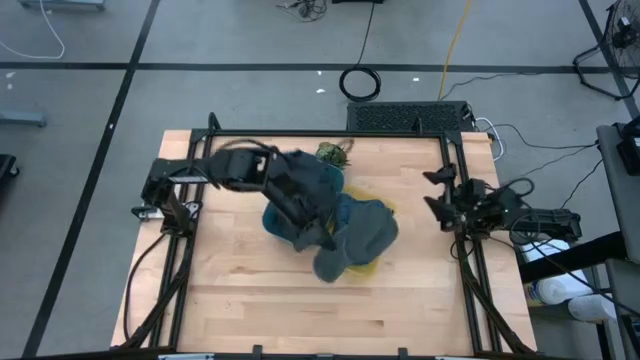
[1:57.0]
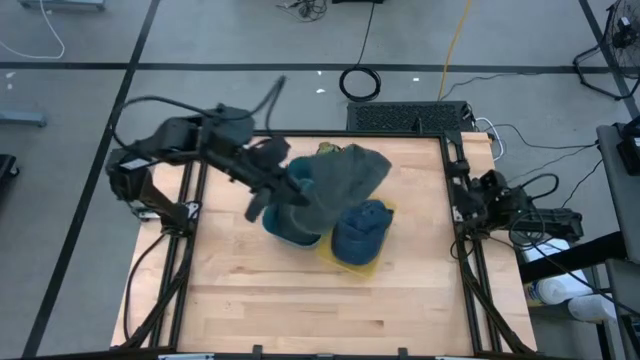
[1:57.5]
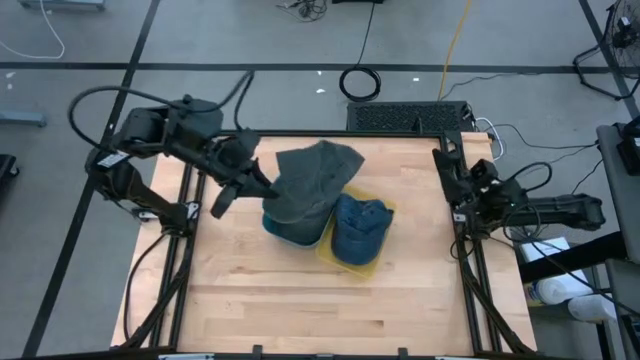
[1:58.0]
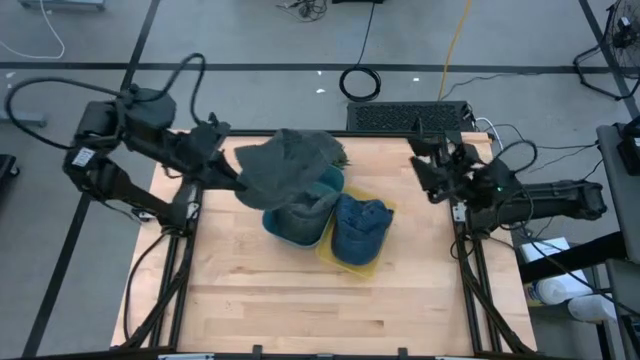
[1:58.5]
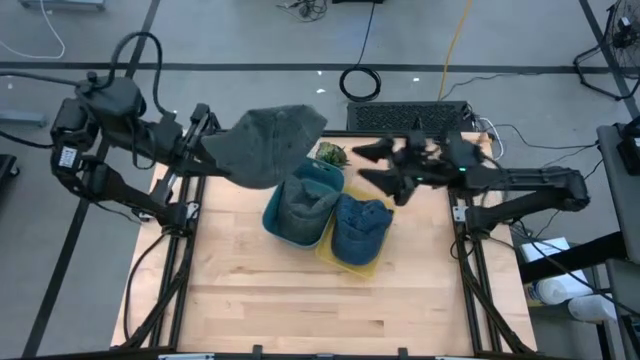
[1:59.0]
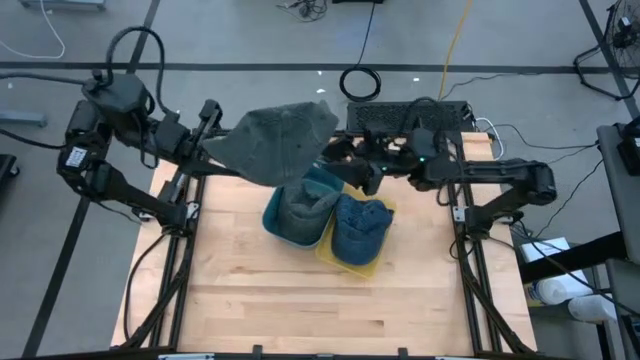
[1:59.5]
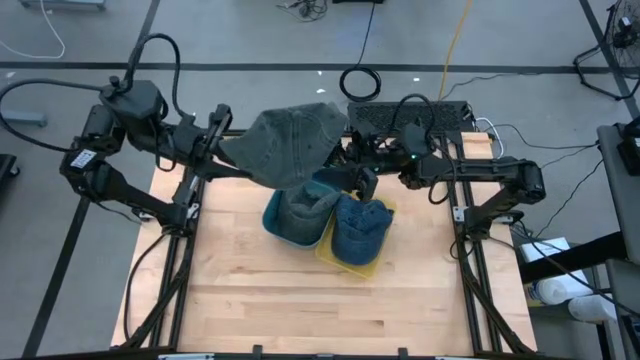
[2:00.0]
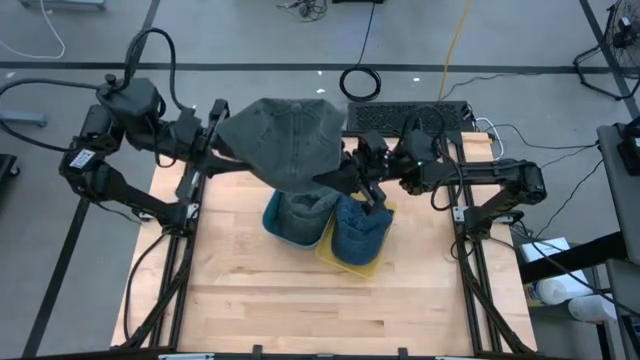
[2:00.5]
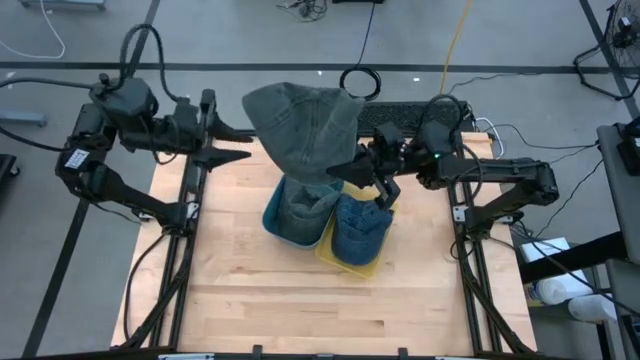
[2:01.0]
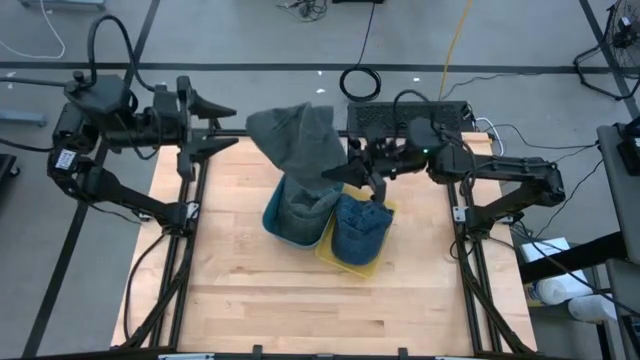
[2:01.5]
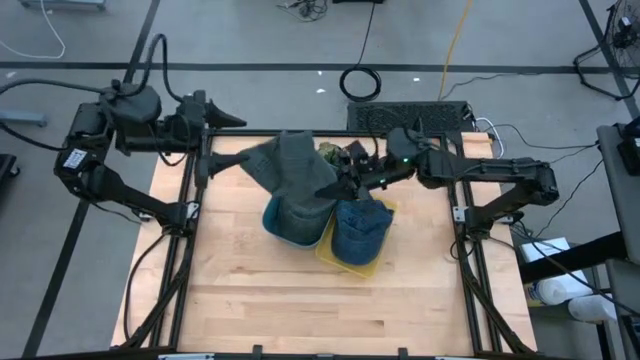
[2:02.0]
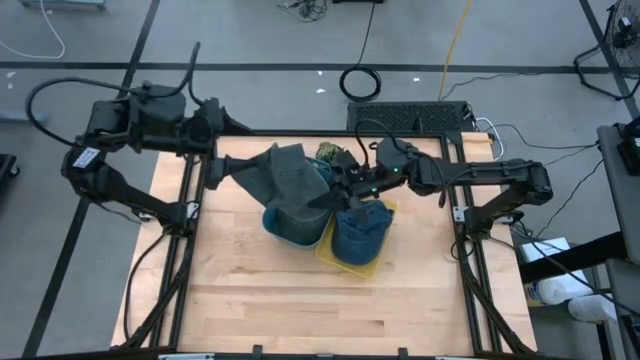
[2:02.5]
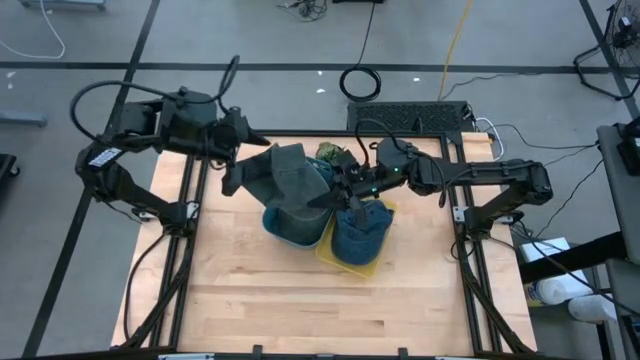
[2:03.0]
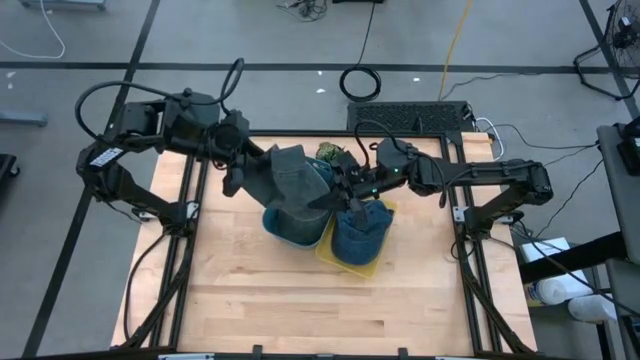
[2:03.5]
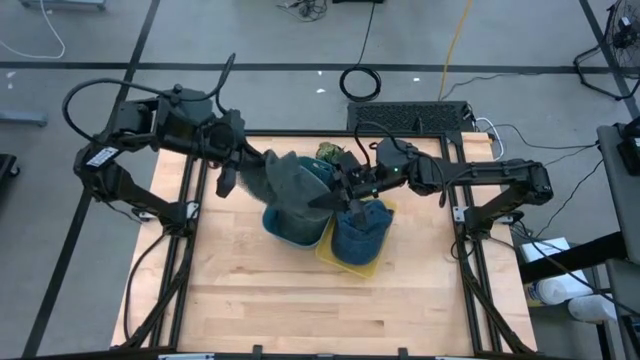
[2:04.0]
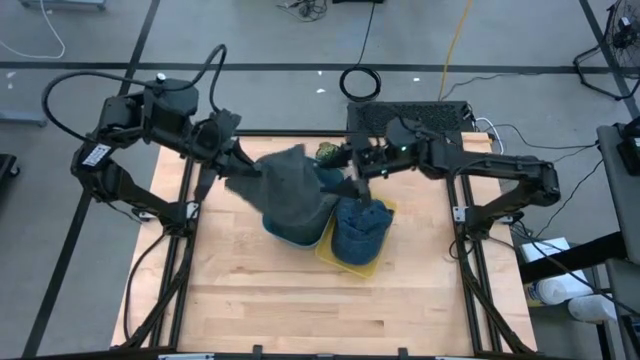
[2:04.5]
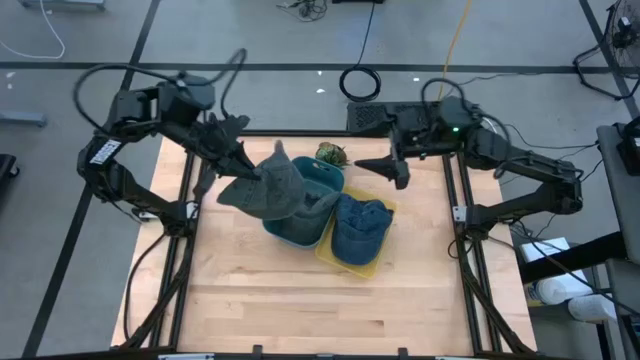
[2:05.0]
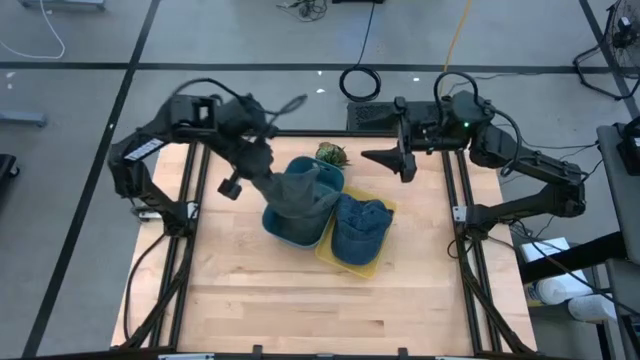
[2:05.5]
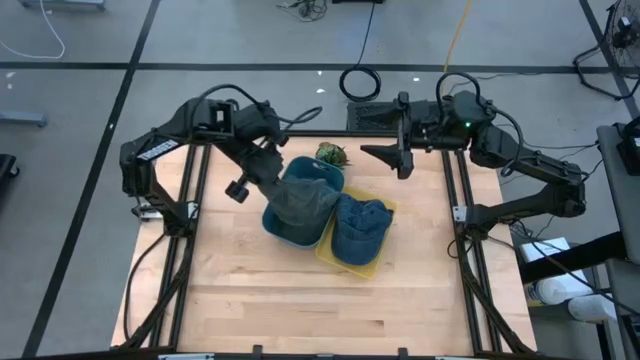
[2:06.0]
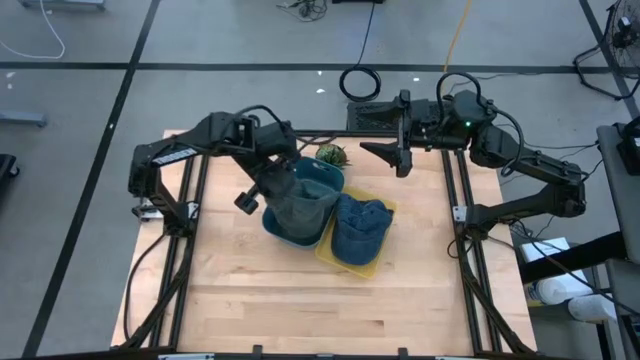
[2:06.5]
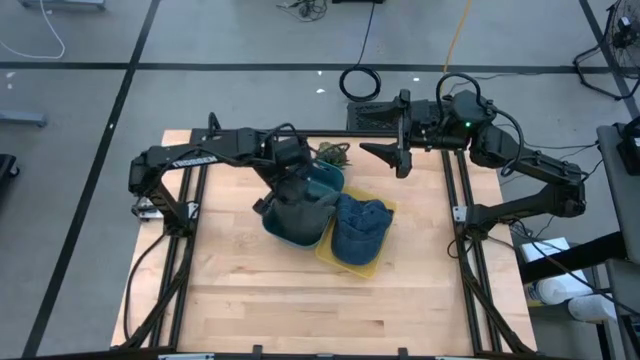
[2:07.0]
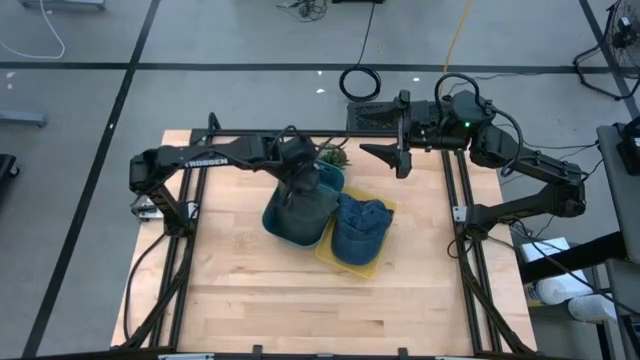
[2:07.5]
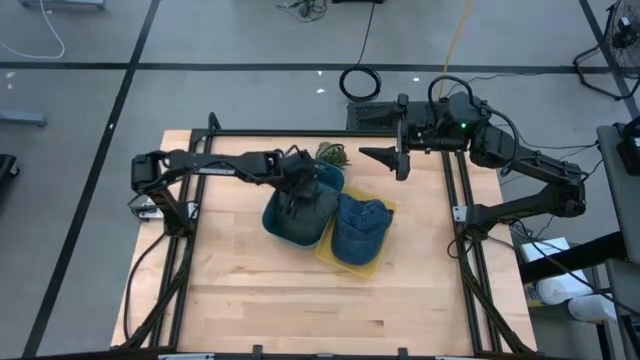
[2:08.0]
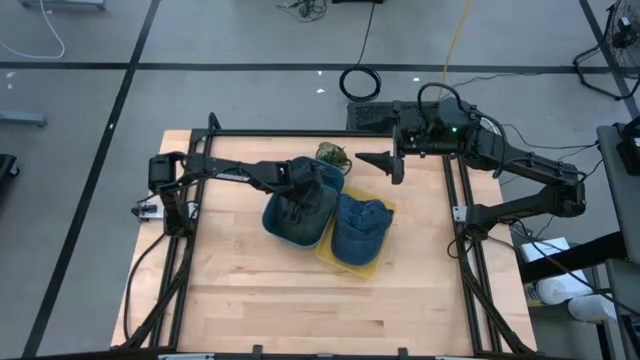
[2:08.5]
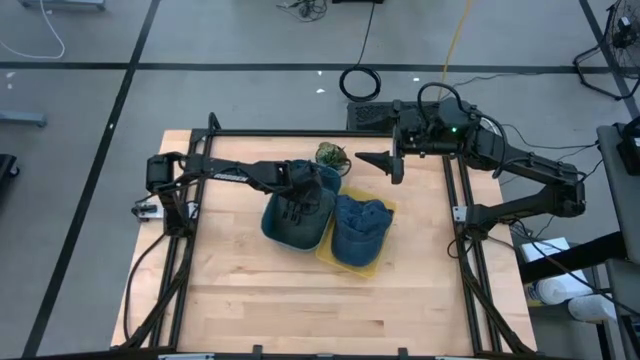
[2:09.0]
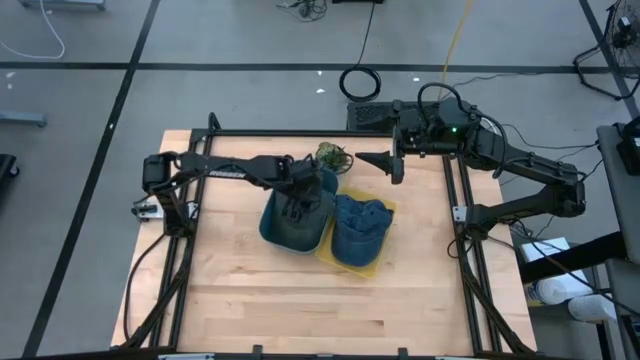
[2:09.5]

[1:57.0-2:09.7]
Task: Pick & Place hat
Put the black cap into the blue bin

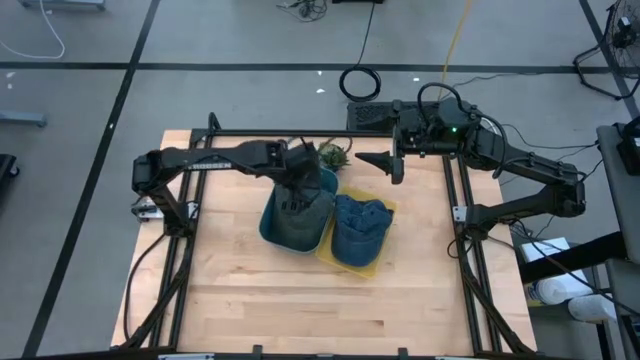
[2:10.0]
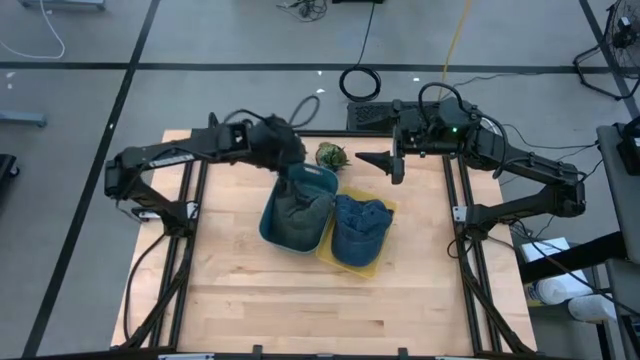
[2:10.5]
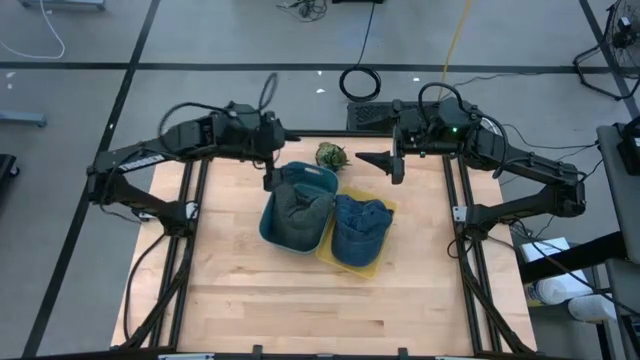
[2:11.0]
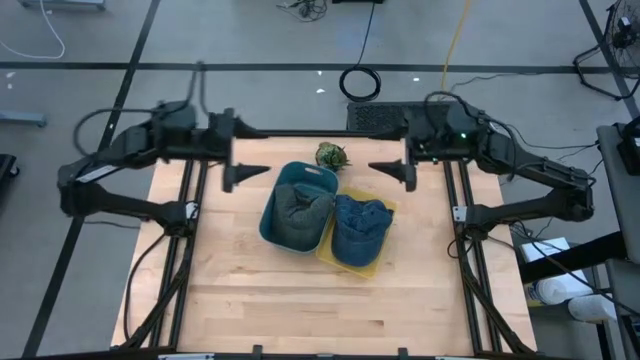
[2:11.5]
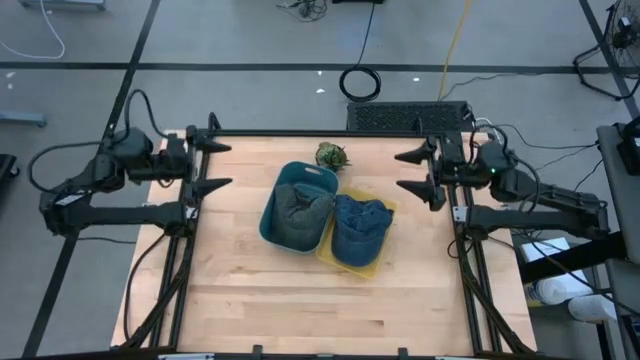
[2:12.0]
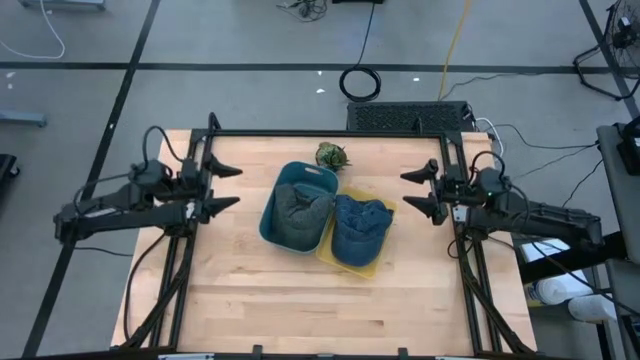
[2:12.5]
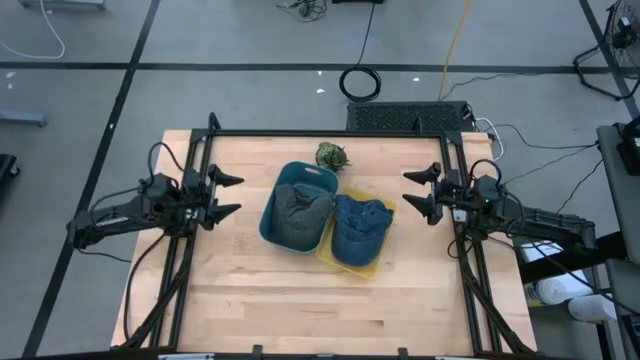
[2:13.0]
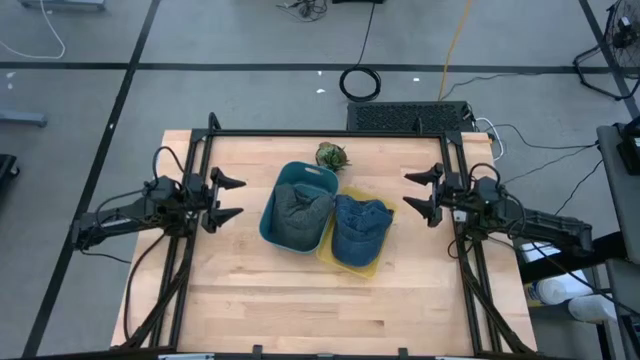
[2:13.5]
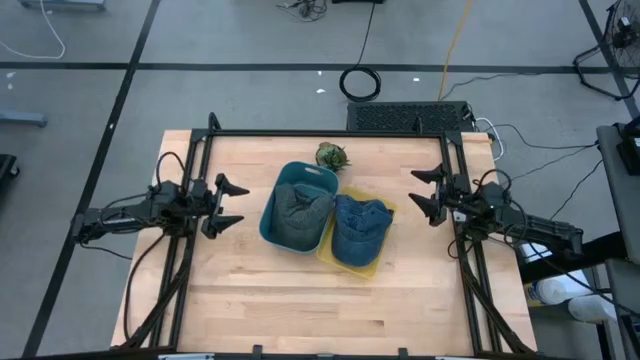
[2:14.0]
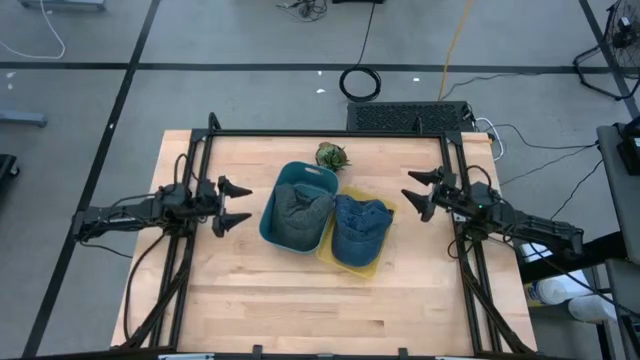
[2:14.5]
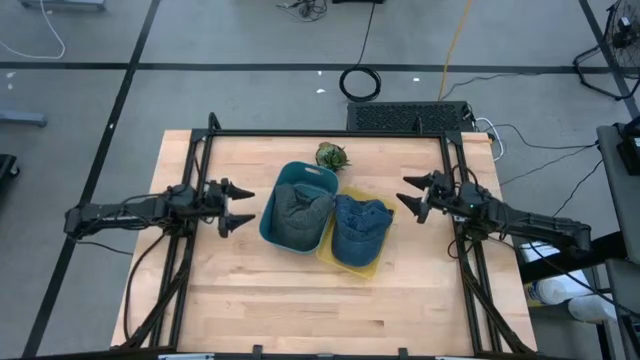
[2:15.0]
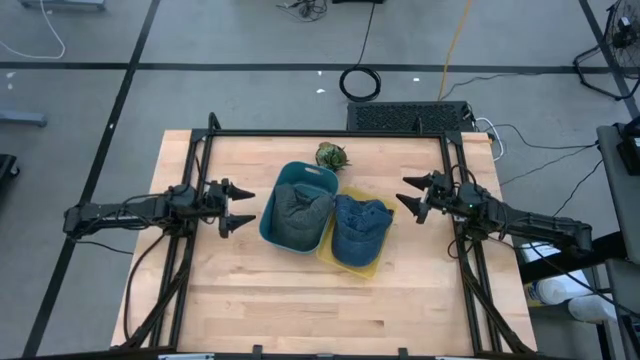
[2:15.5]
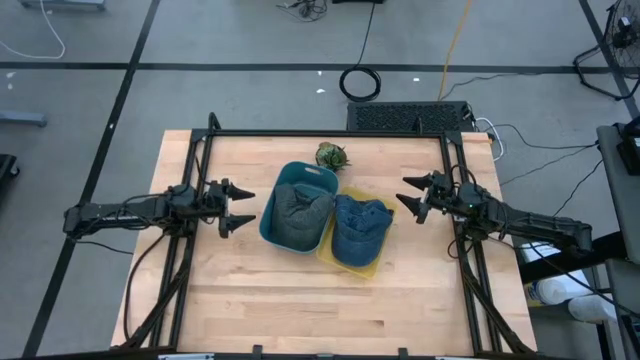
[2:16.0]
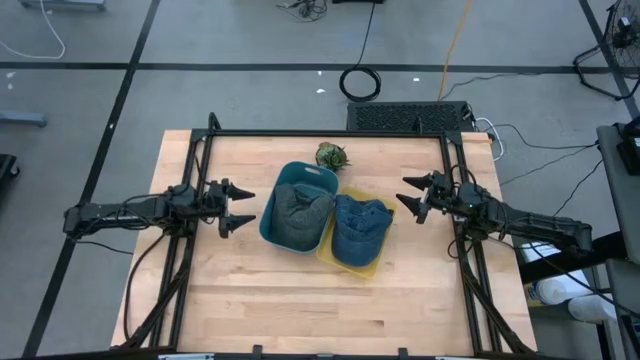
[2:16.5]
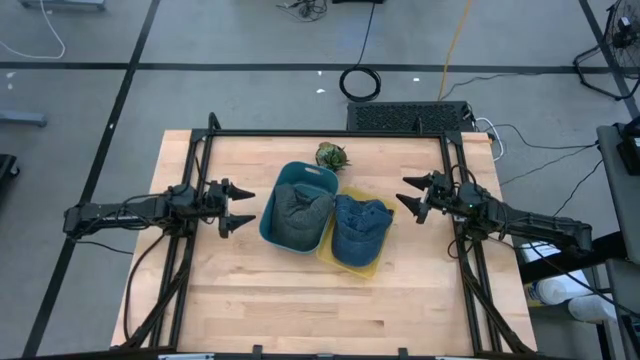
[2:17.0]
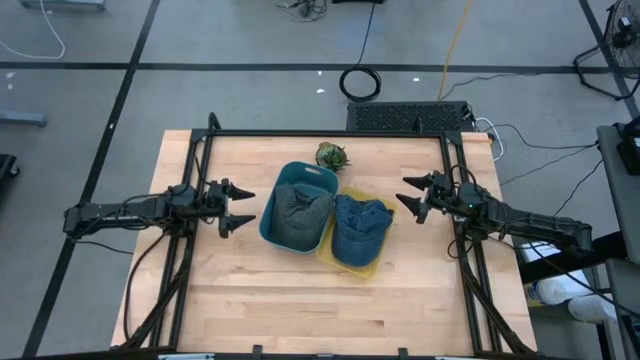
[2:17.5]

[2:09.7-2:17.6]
Return to Home Position
